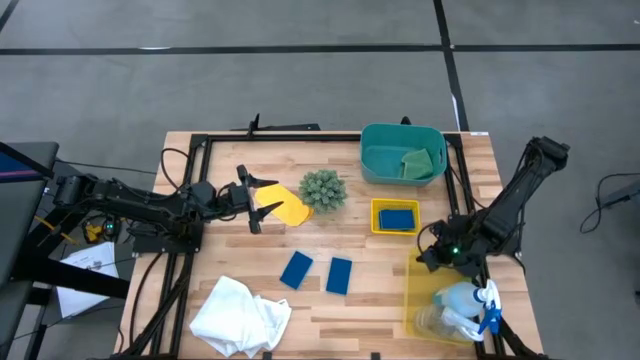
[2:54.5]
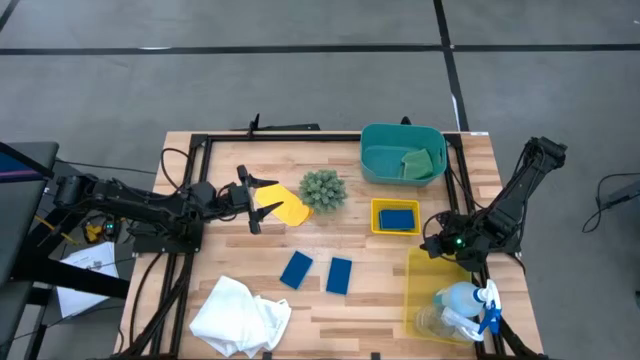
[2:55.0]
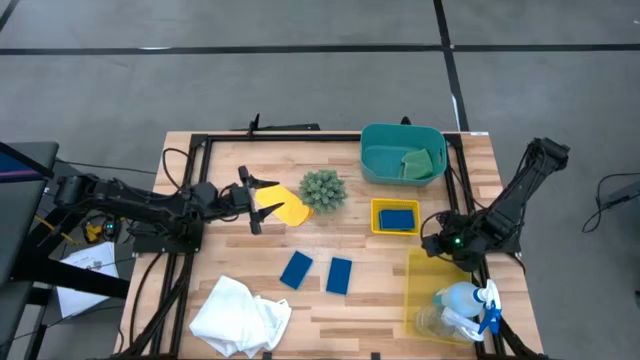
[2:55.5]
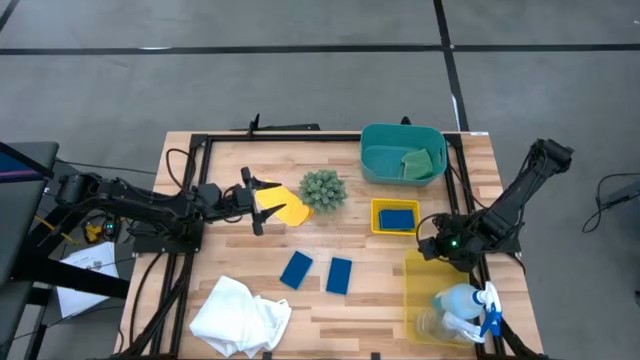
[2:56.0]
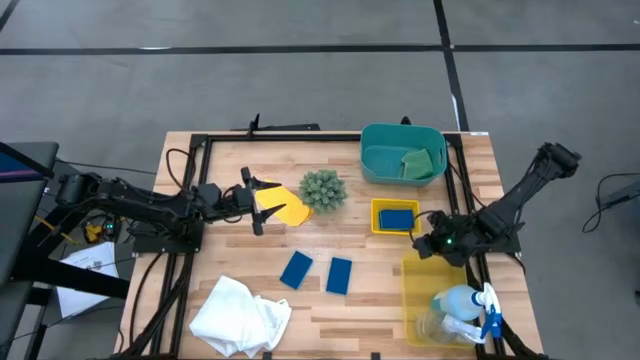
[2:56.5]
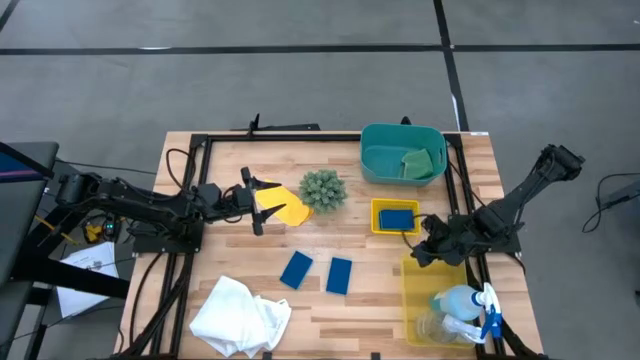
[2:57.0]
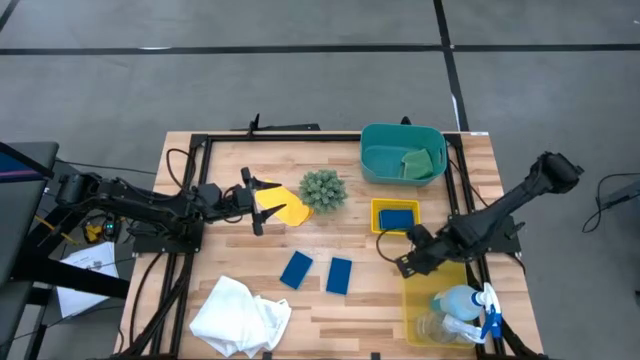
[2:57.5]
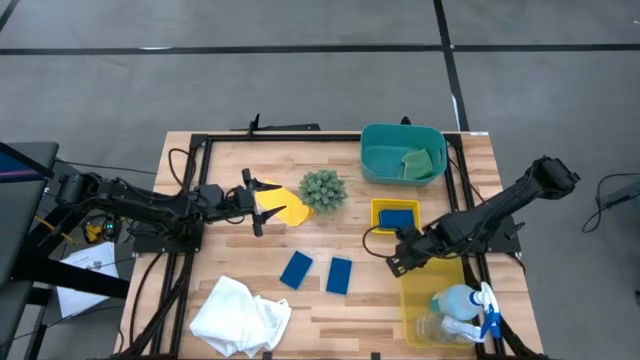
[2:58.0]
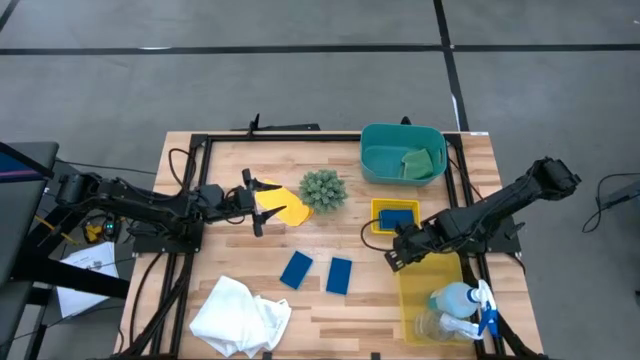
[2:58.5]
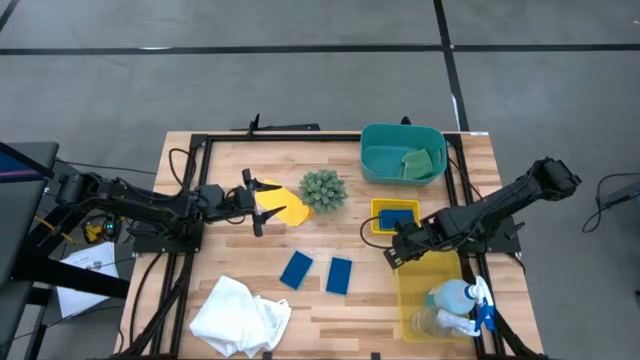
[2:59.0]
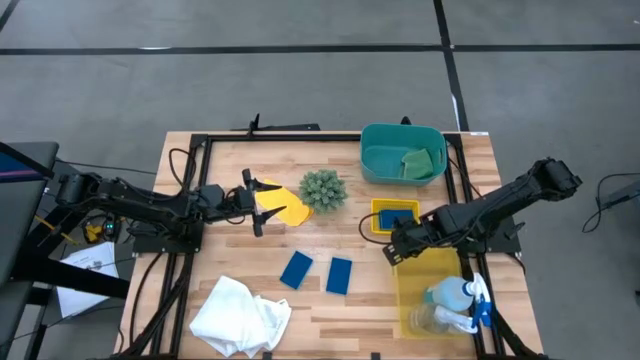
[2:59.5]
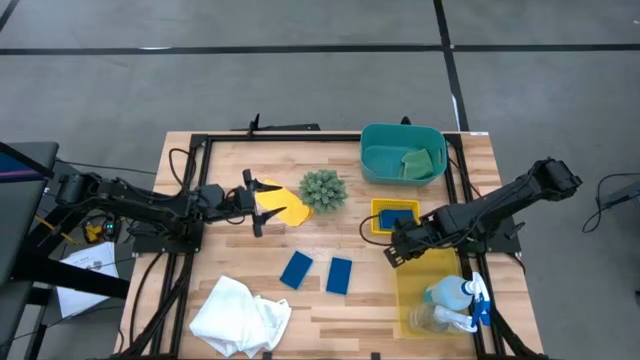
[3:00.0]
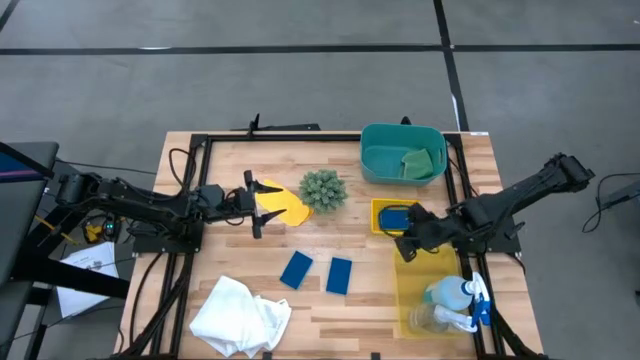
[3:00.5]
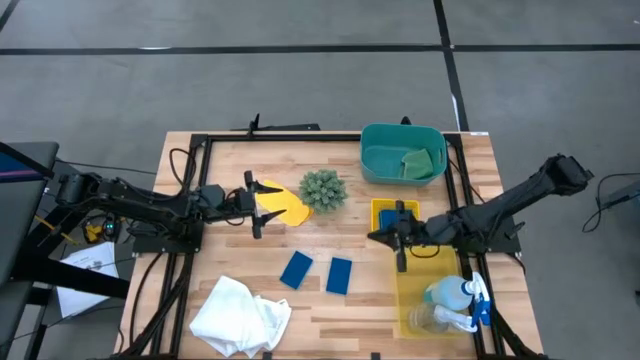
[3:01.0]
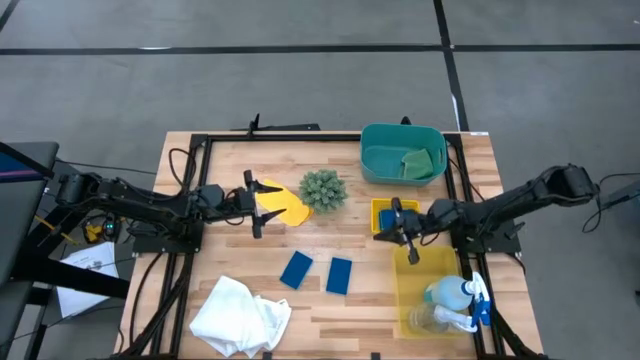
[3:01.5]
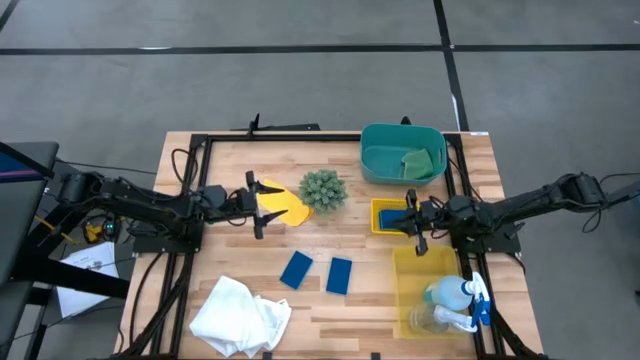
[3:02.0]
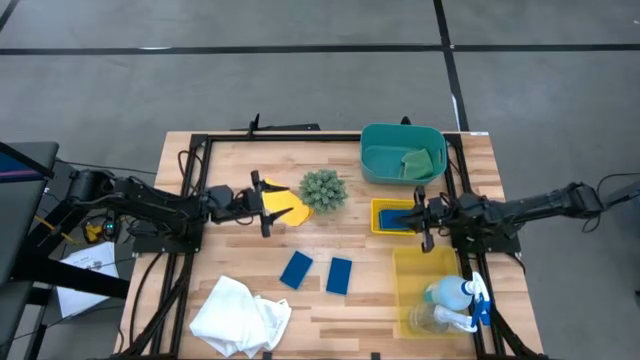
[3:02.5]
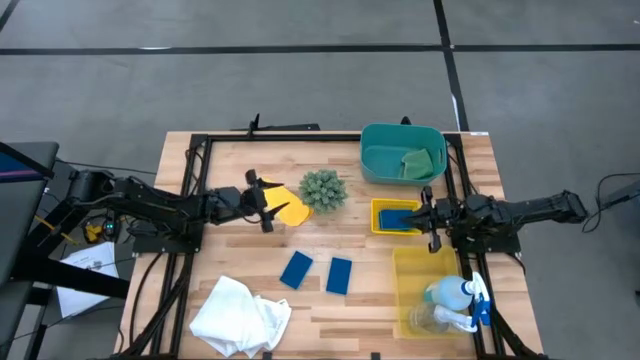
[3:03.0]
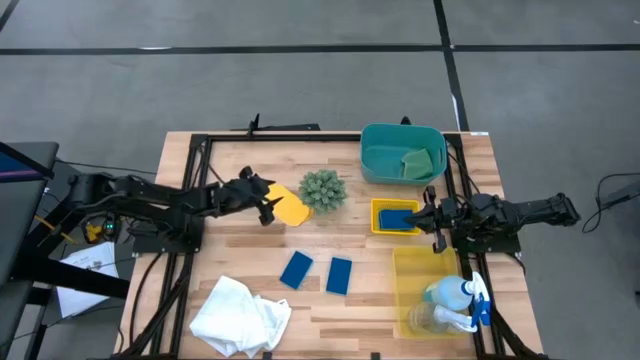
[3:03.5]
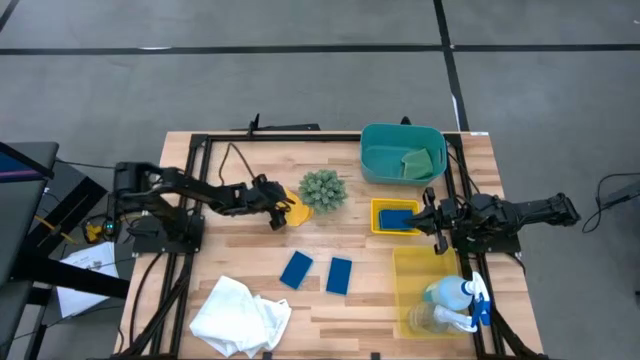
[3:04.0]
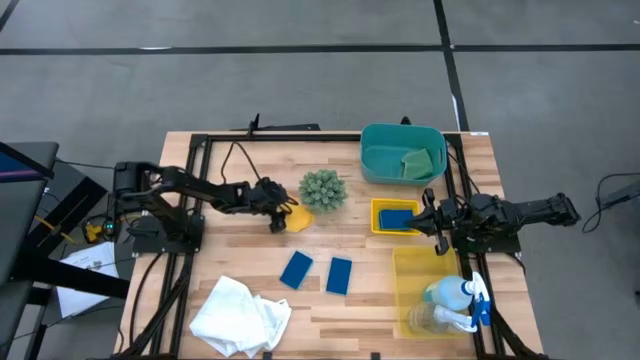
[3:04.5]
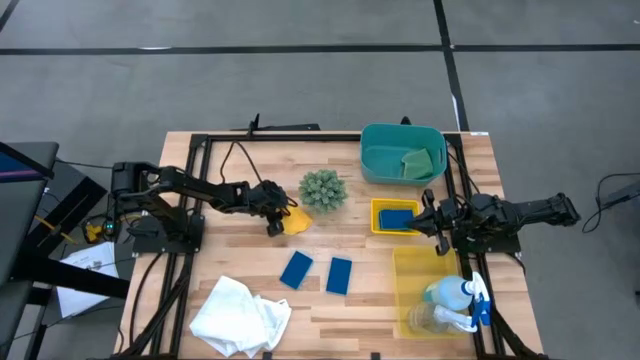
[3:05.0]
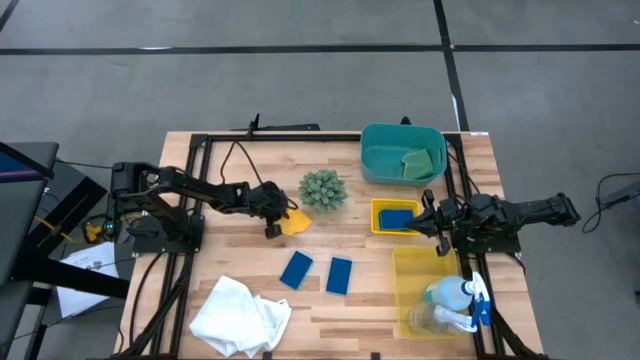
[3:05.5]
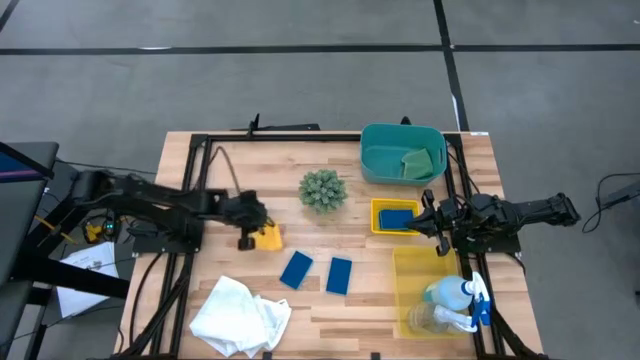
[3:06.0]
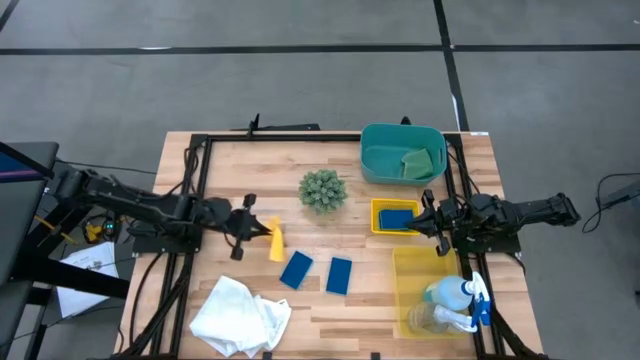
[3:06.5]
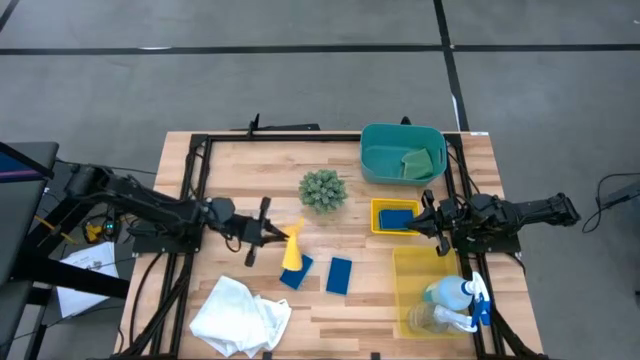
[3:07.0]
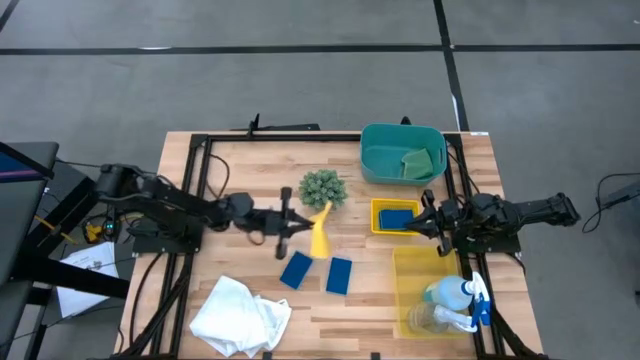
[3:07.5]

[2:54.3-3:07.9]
Task: Pick & Place Kitchen Items
Put the yellow towel into the green bin

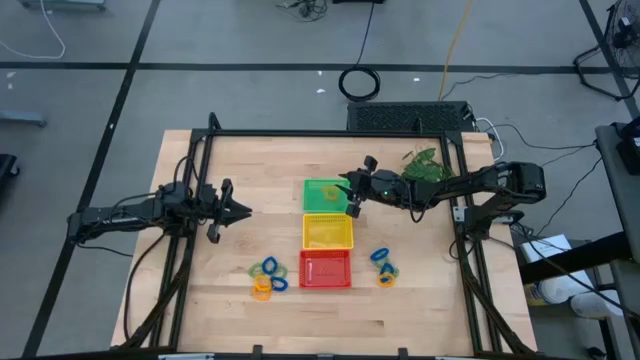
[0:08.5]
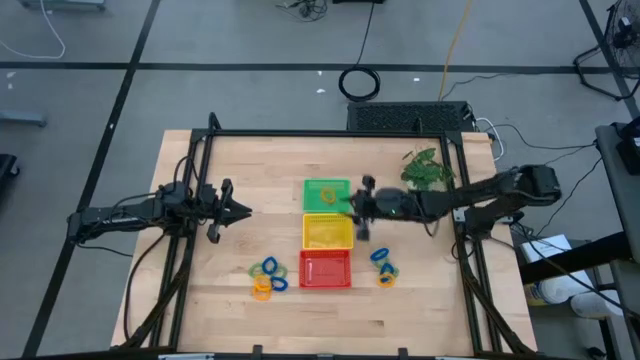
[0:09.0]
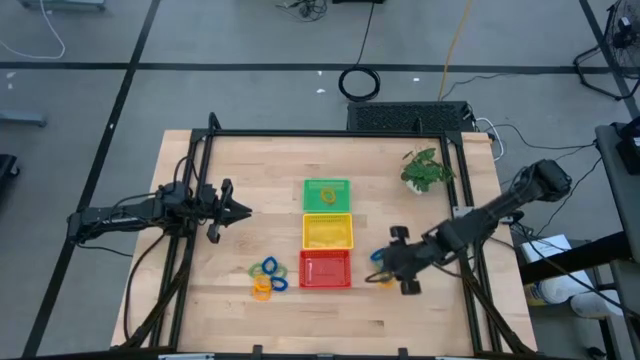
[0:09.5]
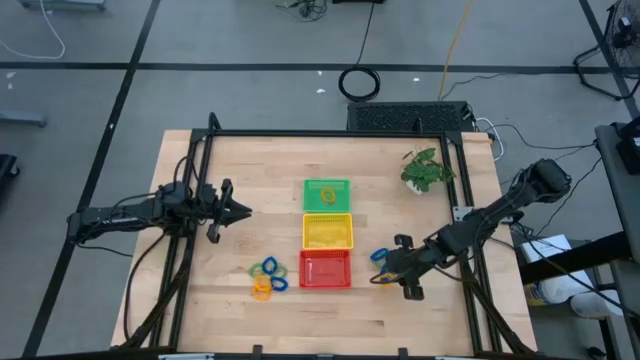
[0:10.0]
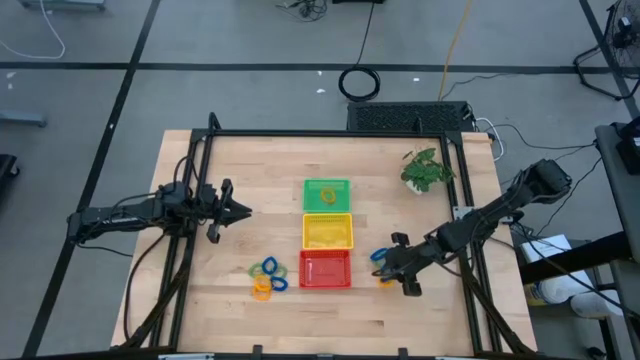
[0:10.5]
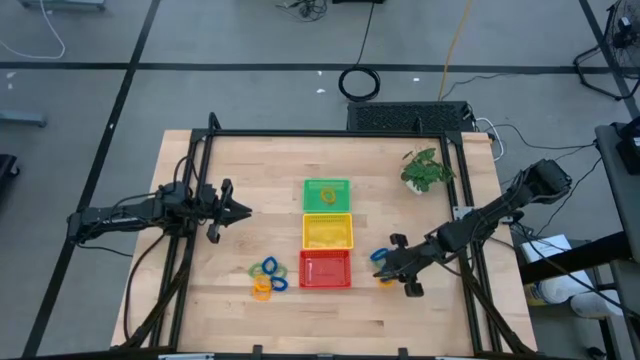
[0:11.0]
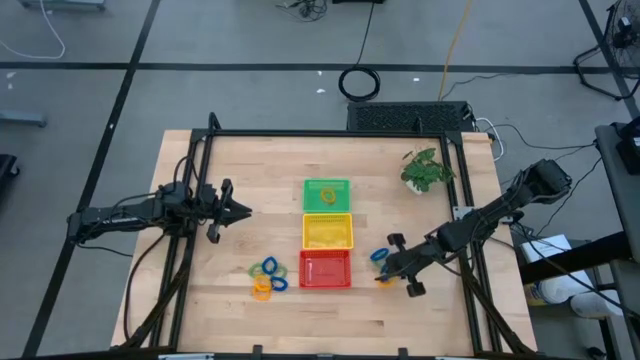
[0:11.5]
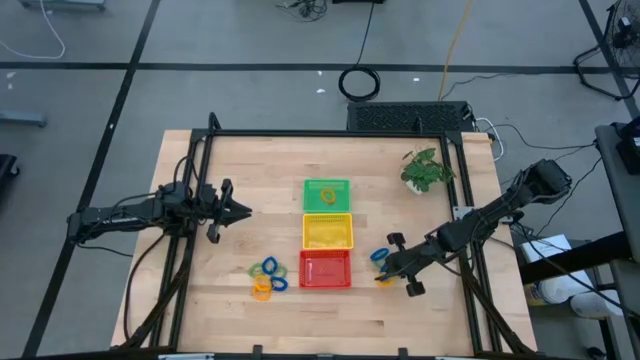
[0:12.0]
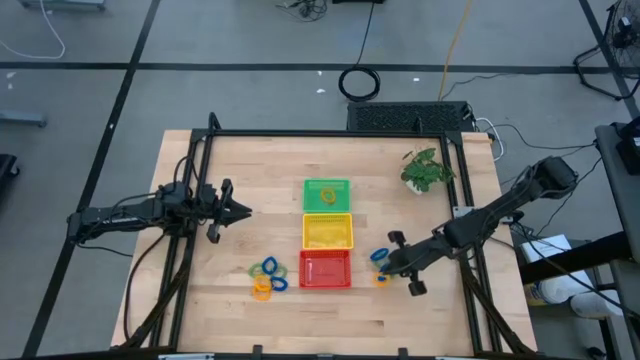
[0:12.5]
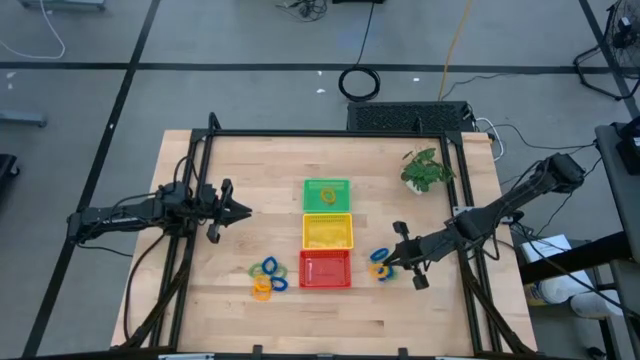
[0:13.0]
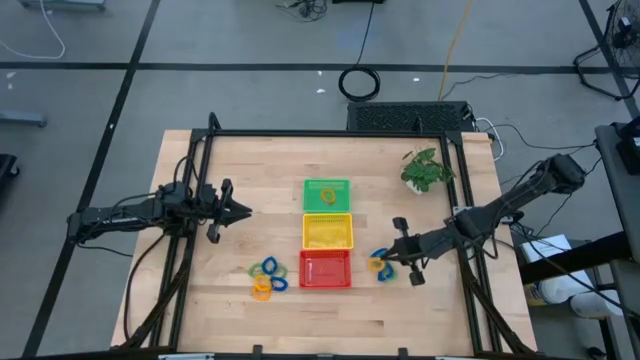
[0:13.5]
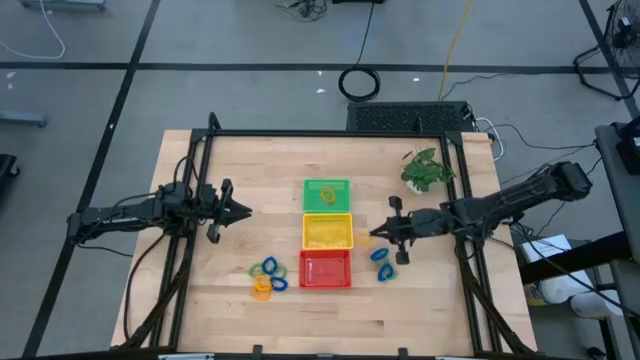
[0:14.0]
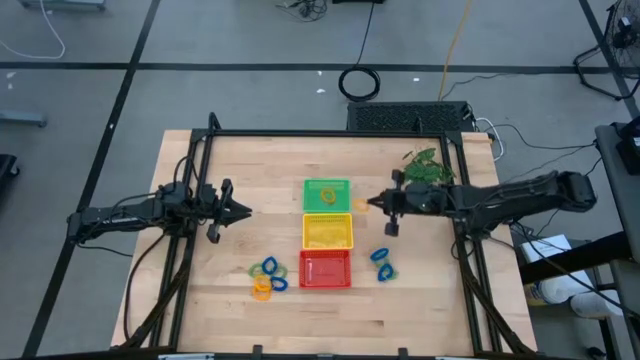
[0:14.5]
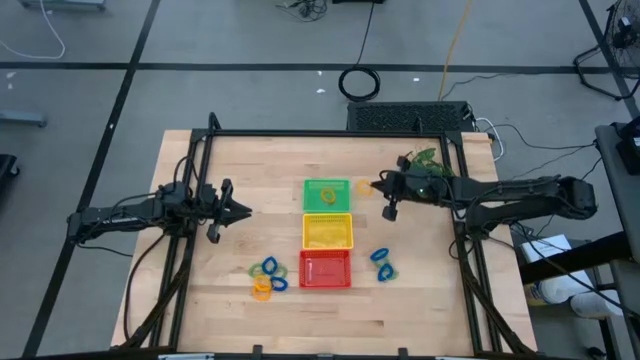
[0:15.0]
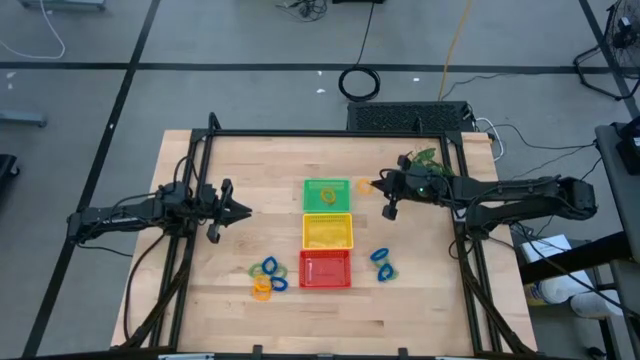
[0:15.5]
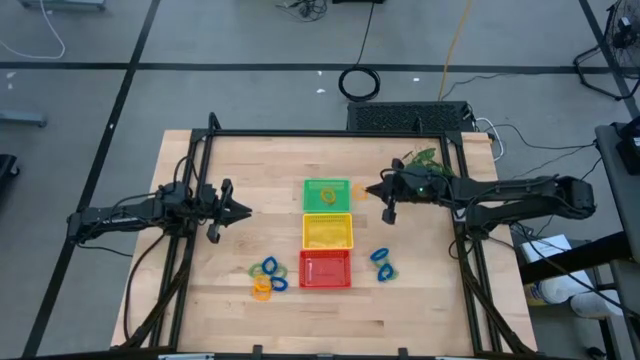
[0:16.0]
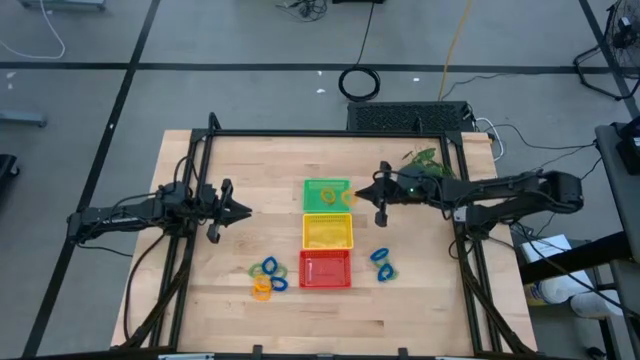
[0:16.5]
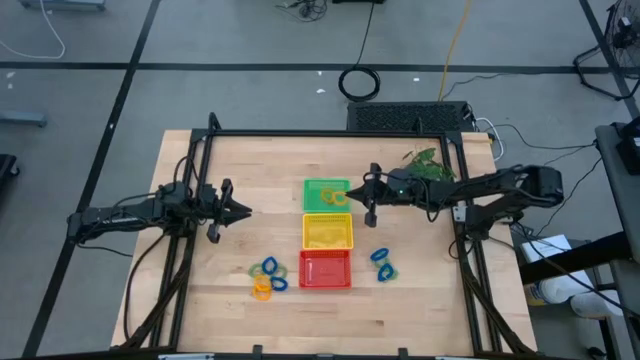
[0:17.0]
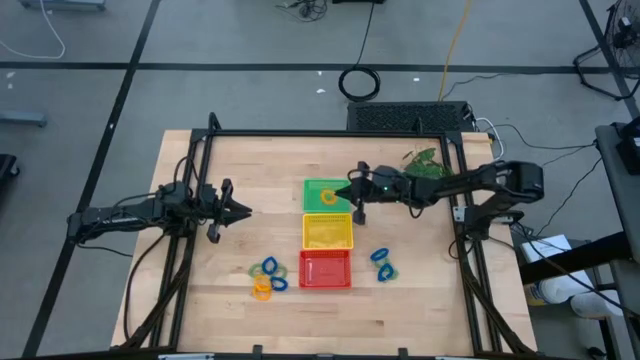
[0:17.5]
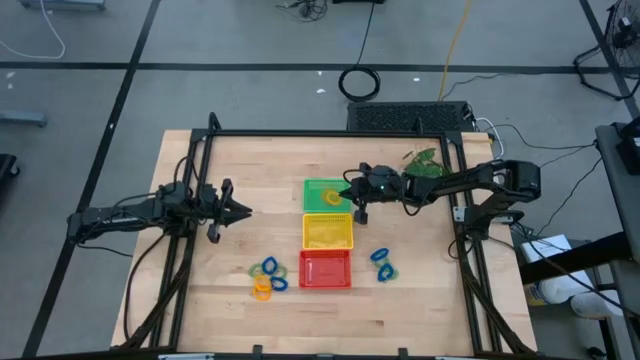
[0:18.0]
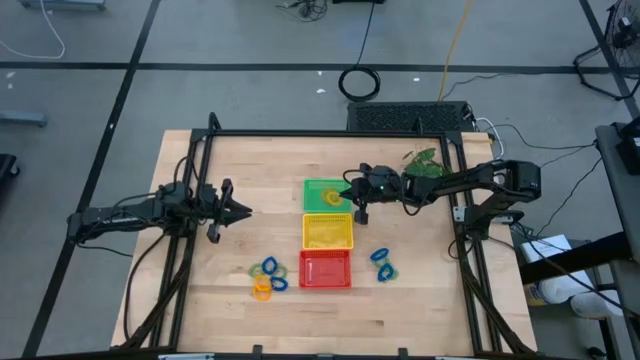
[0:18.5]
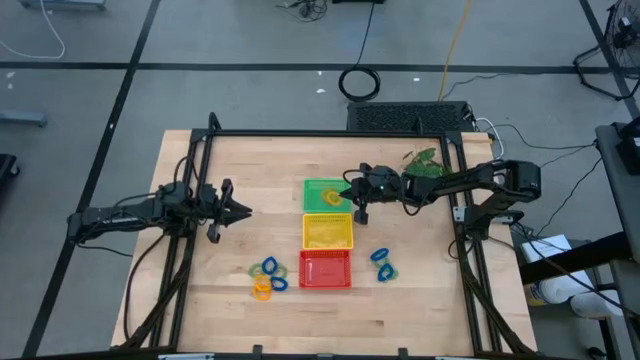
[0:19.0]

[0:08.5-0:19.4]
Task: Sort spring keychains into baskets
Put the yellow spring keychain into the green basket
